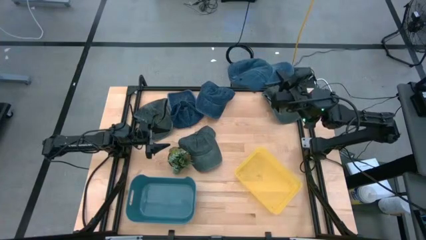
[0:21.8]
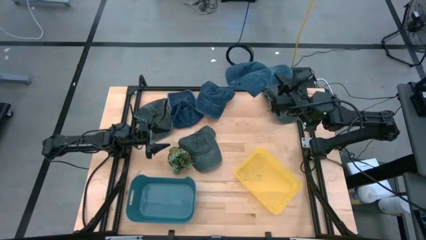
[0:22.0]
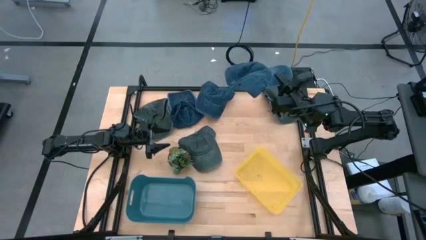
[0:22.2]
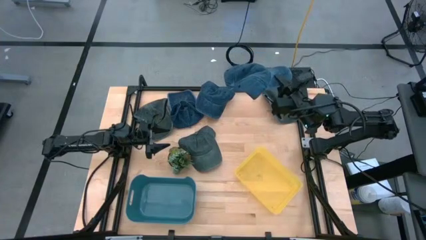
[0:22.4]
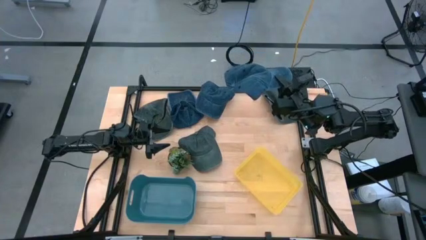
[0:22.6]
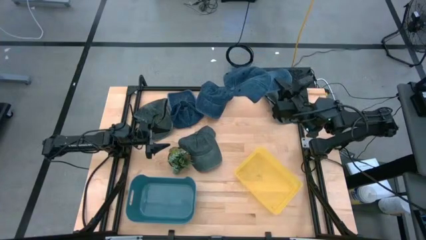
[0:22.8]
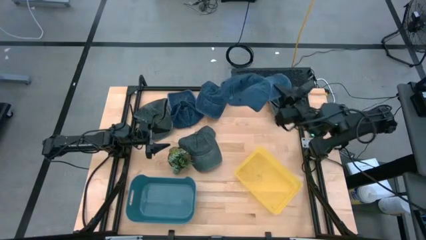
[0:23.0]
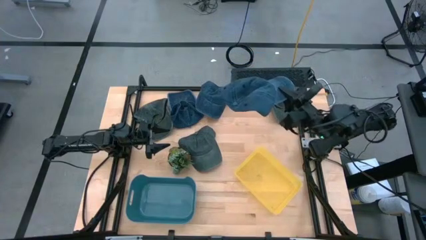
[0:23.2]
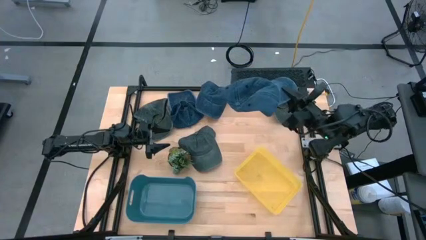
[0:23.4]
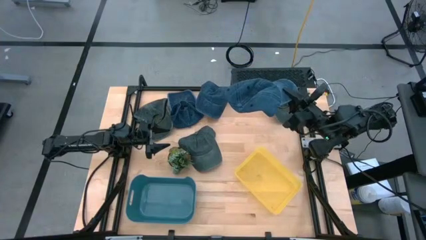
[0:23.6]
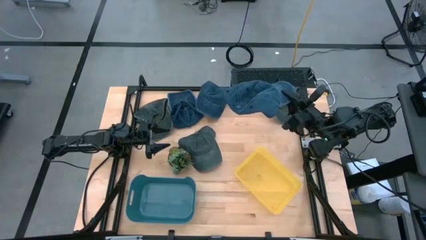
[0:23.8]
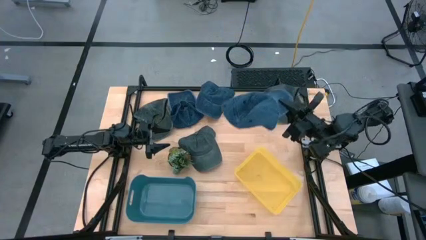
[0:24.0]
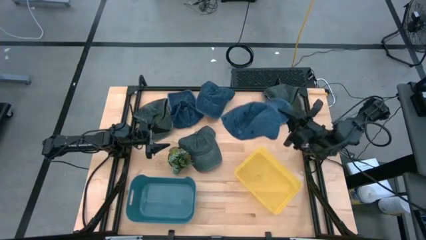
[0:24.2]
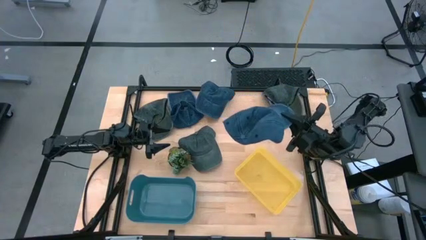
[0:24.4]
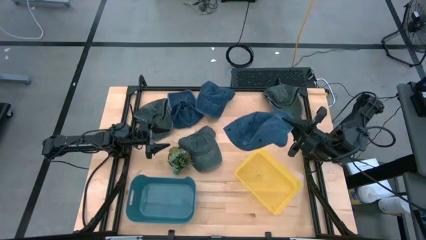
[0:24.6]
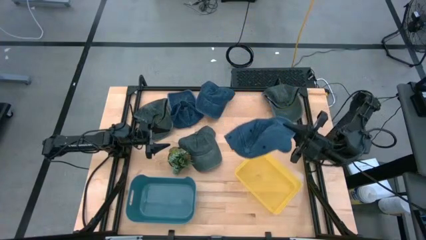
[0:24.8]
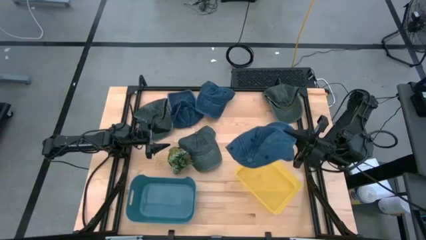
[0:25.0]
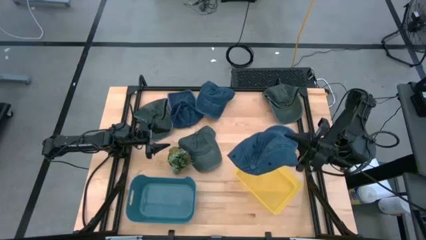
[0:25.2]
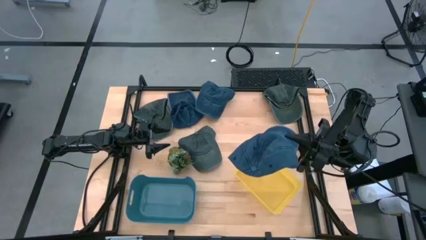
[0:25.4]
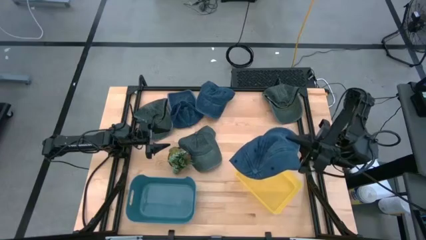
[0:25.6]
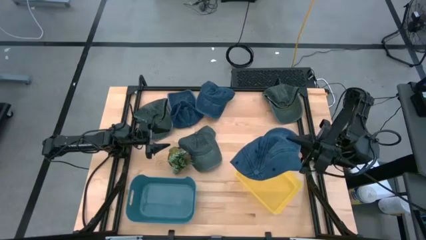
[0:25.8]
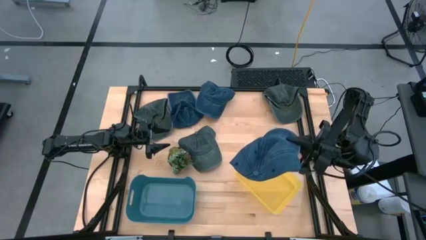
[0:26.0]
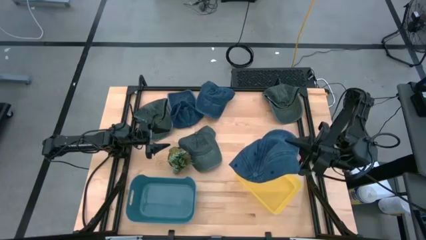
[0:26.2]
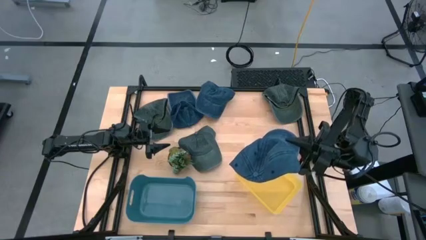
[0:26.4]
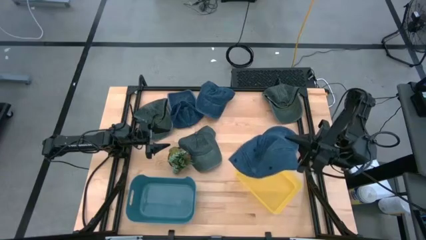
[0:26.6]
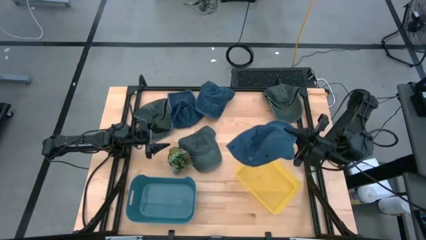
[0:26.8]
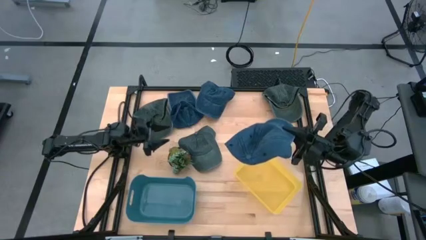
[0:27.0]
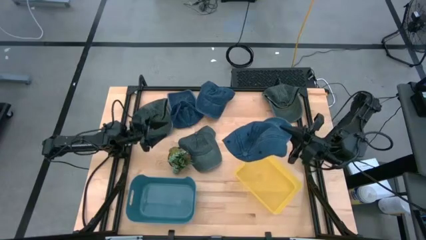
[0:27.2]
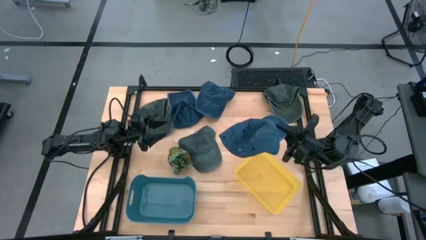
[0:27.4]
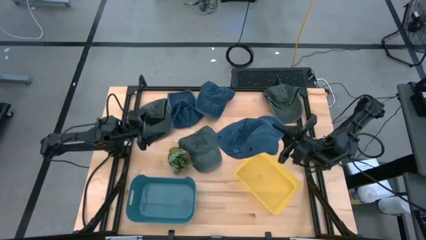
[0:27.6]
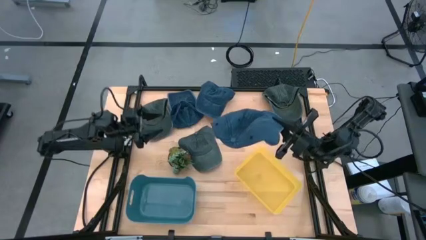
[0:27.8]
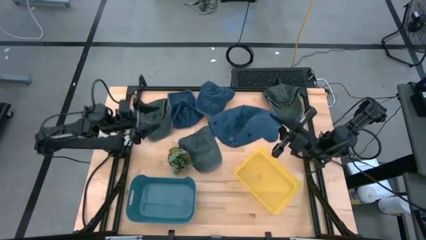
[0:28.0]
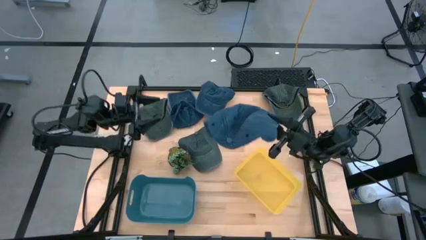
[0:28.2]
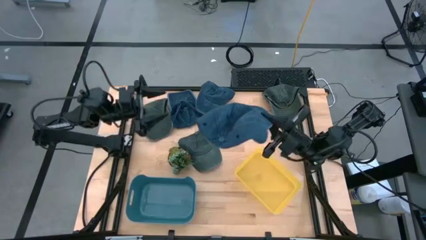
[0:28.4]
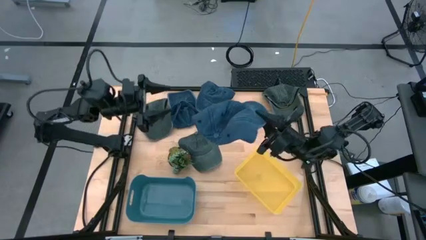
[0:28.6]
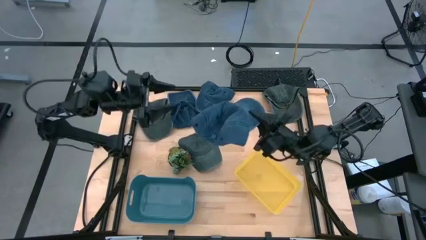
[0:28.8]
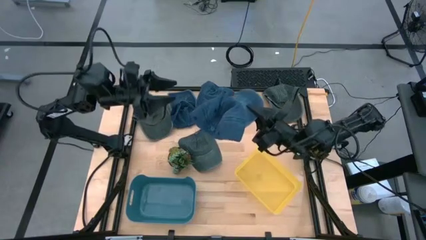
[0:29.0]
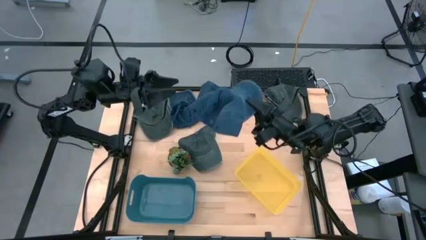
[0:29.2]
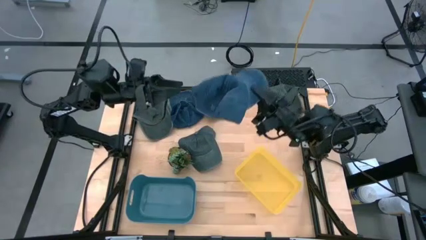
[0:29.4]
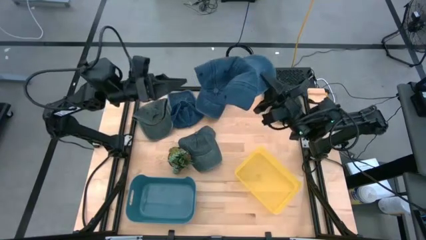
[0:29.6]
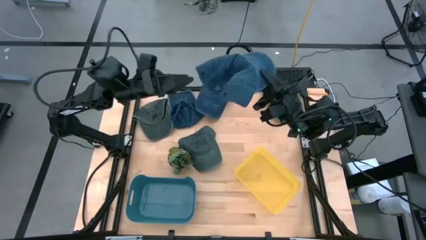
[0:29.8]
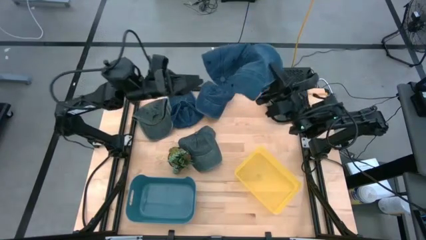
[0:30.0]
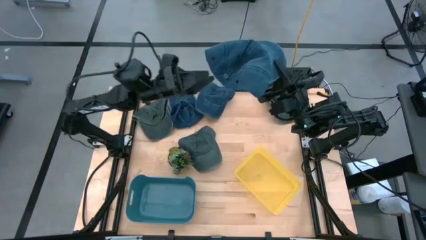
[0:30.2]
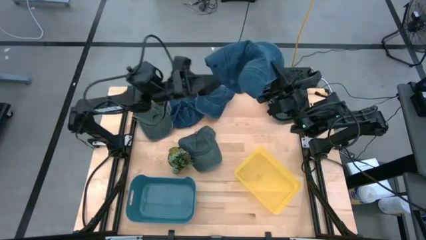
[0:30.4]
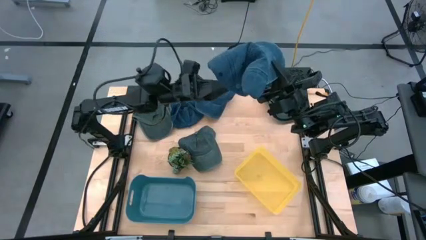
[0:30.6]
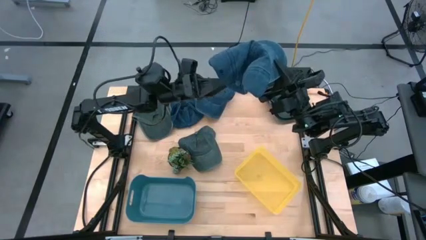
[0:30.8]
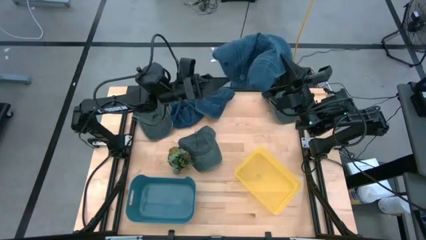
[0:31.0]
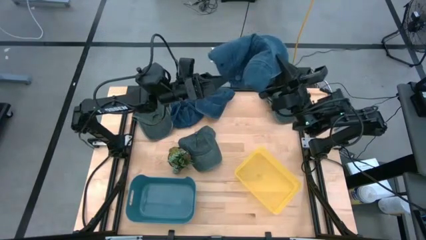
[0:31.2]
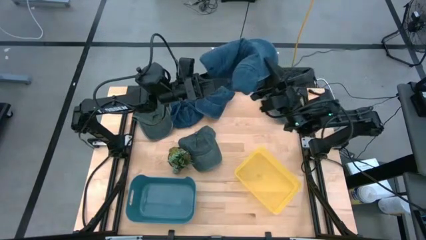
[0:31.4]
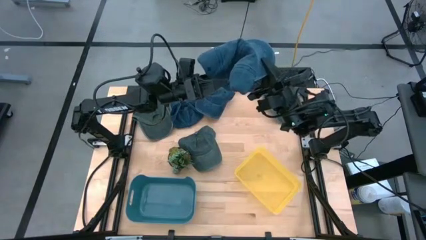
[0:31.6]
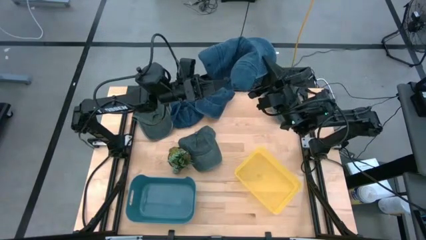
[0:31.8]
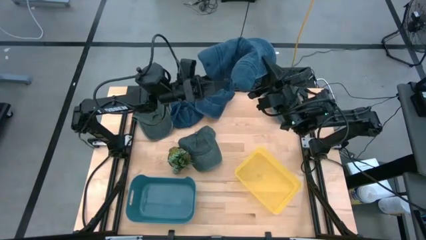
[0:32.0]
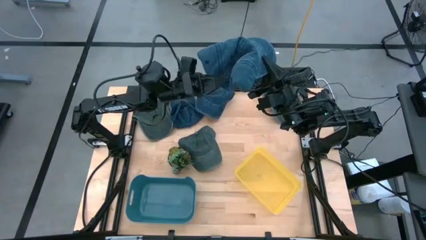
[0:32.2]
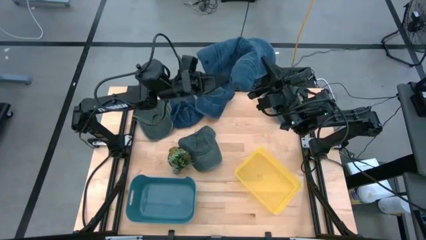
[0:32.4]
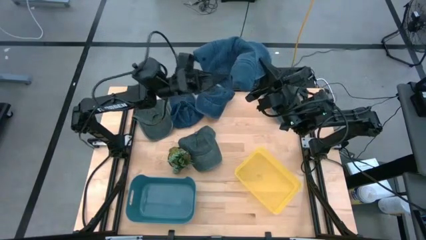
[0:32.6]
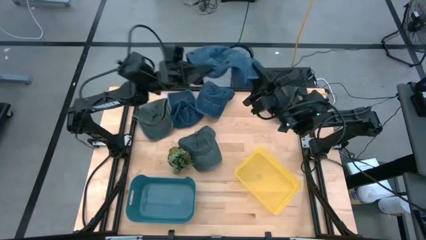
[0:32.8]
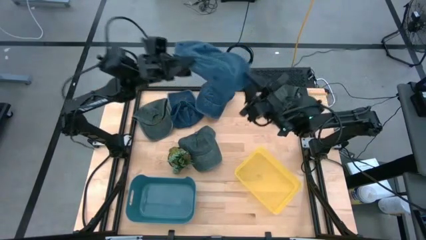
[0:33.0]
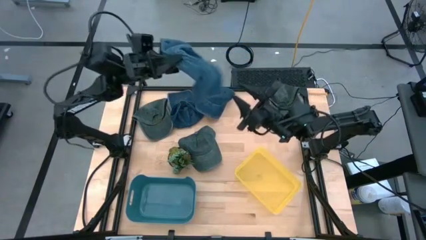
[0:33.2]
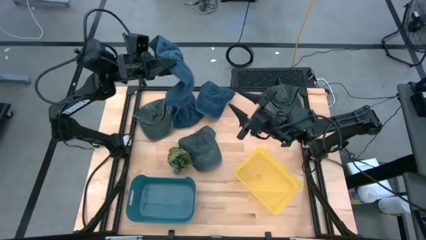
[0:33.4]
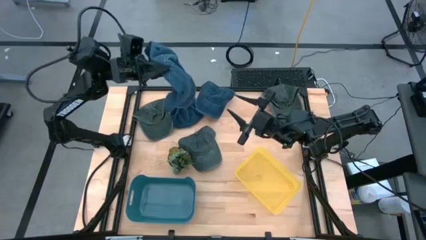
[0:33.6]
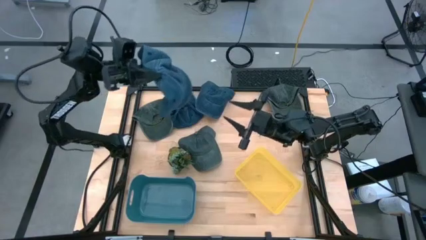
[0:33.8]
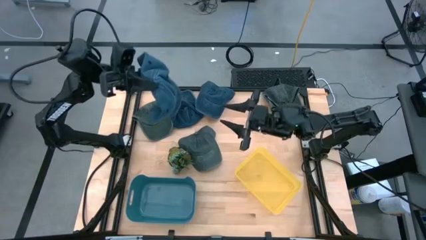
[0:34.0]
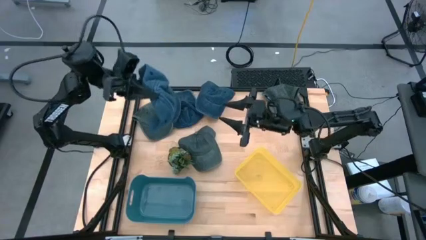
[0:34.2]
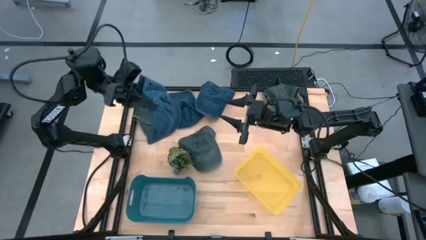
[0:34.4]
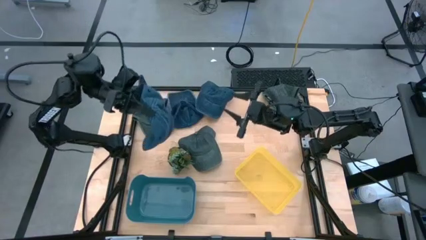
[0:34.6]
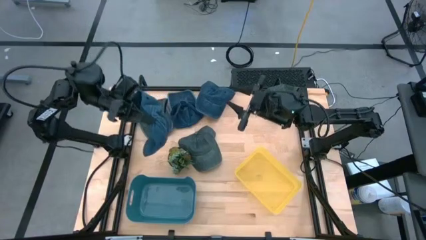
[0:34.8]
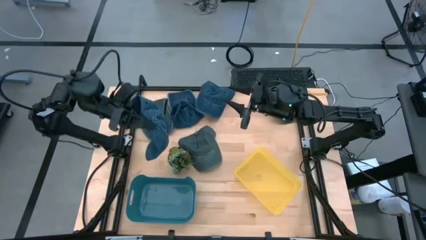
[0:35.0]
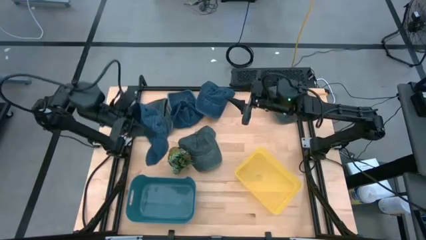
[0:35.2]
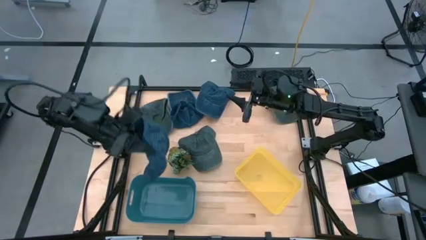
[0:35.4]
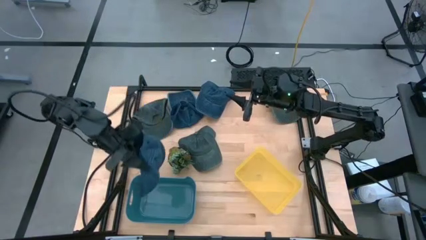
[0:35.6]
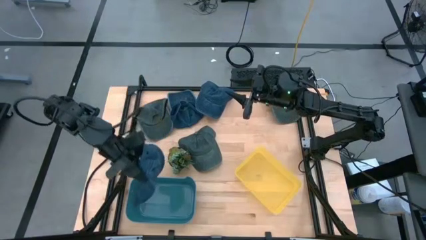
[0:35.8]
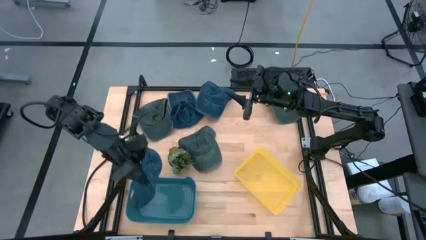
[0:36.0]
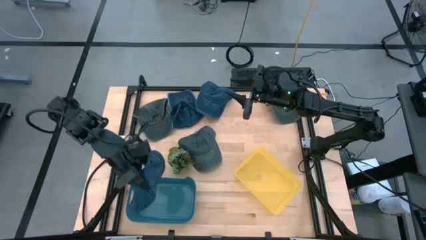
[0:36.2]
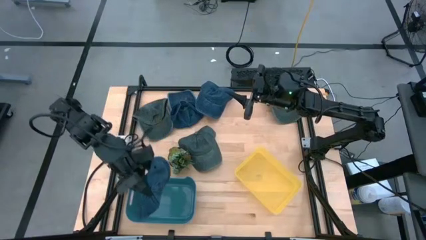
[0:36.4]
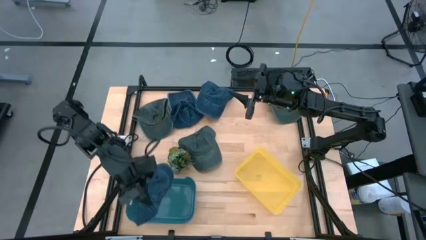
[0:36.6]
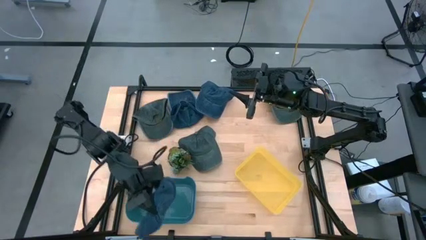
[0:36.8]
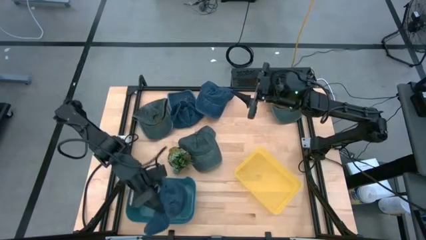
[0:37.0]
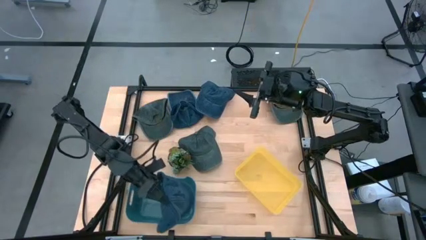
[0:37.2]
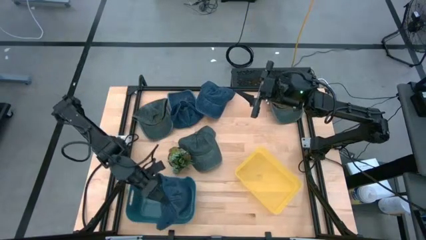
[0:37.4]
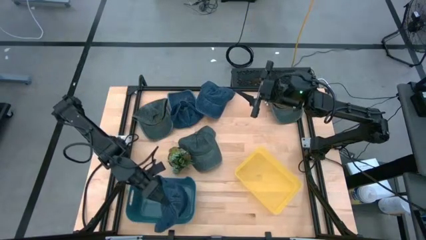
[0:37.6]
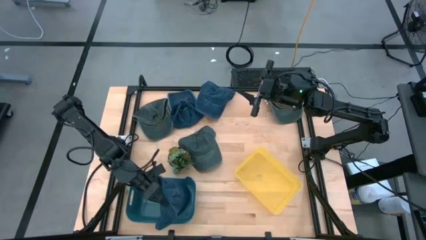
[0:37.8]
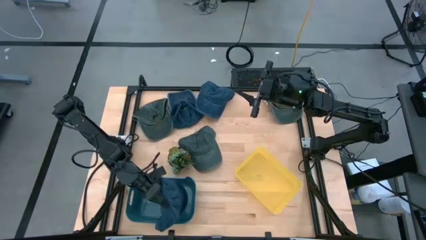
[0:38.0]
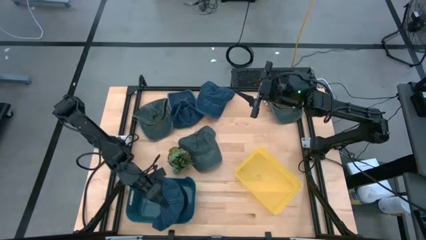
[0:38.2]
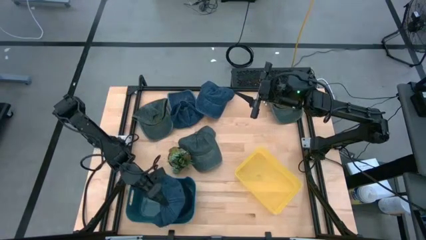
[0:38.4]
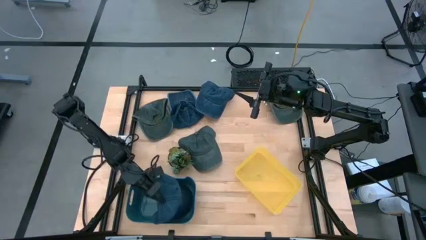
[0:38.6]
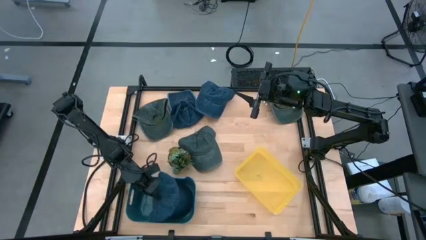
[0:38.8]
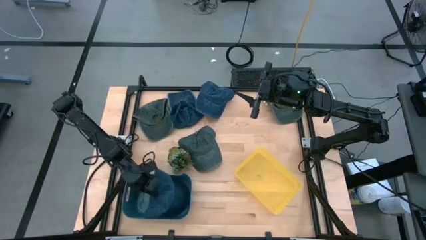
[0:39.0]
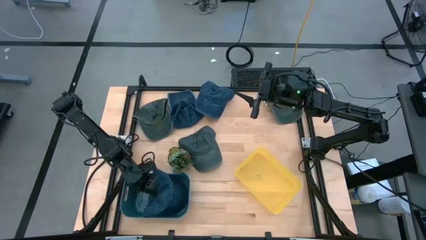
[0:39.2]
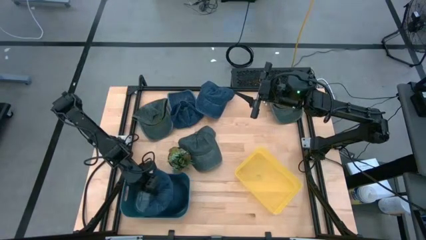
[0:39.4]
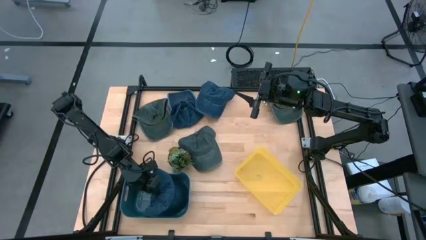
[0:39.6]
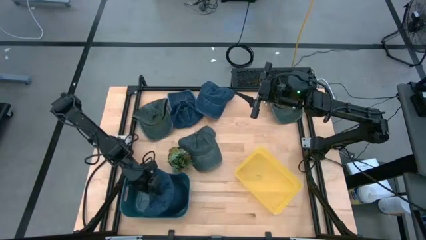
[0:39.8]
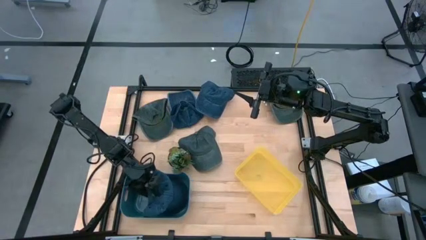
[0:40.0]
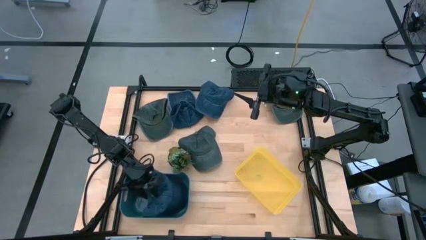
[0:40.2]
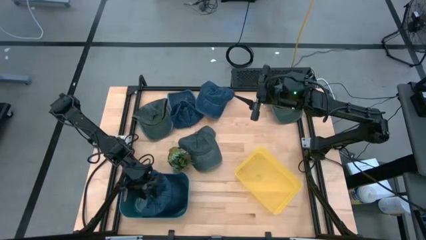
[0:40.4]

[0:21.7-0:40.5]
Task: Pick & Place hat
Put the right blue cap into the blue bin
